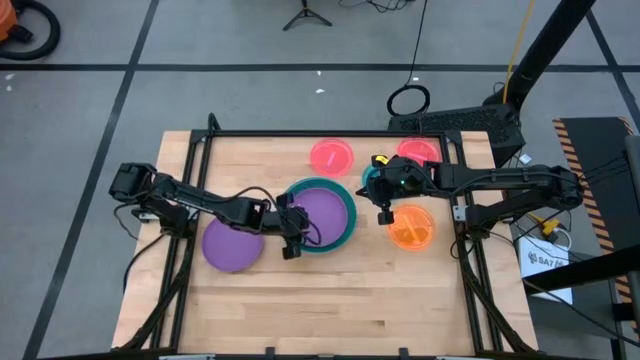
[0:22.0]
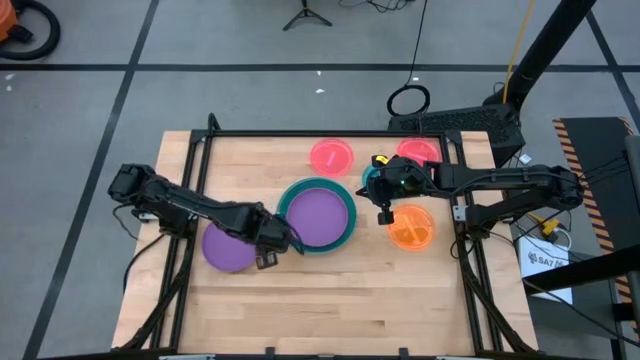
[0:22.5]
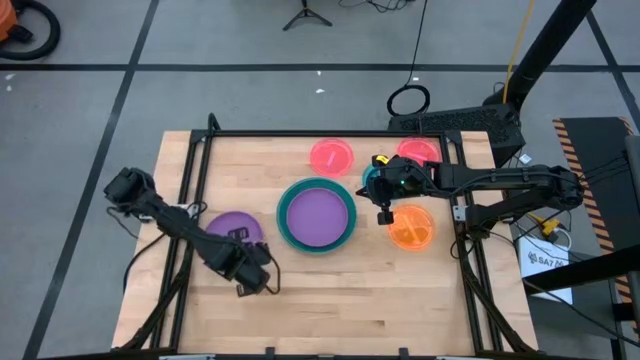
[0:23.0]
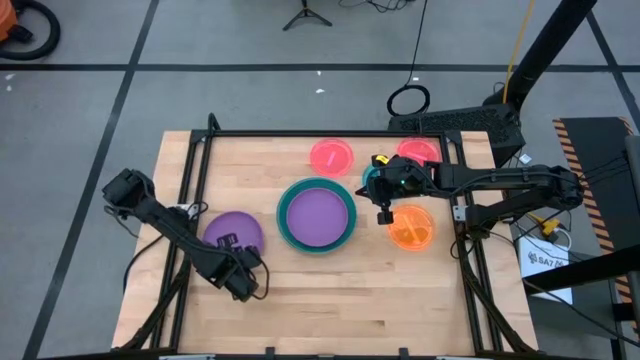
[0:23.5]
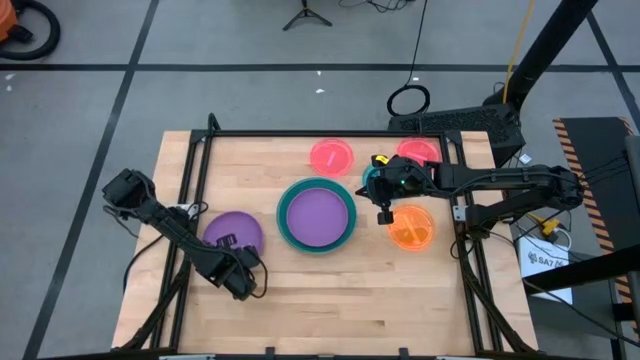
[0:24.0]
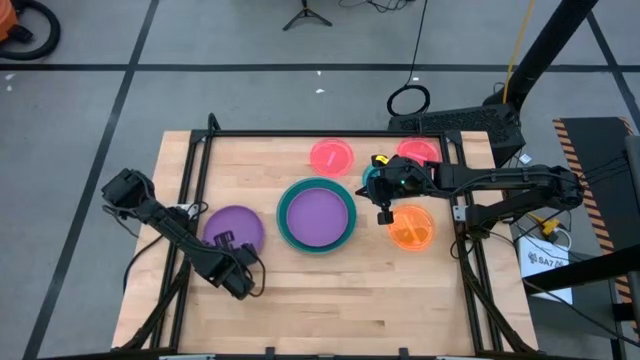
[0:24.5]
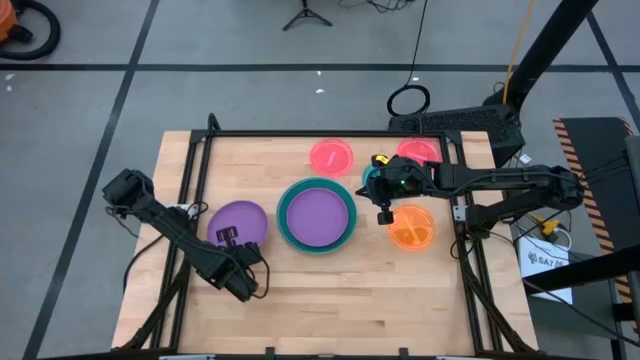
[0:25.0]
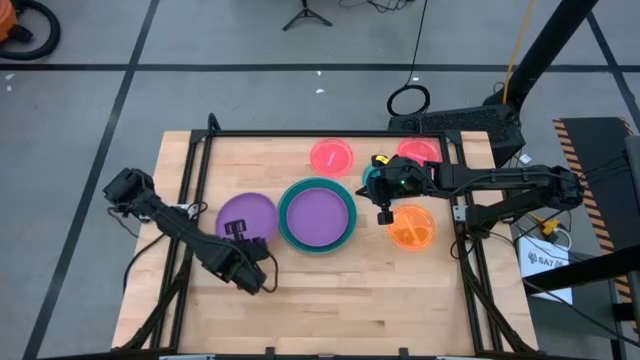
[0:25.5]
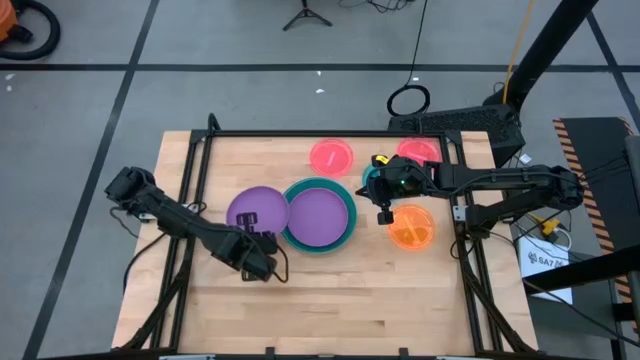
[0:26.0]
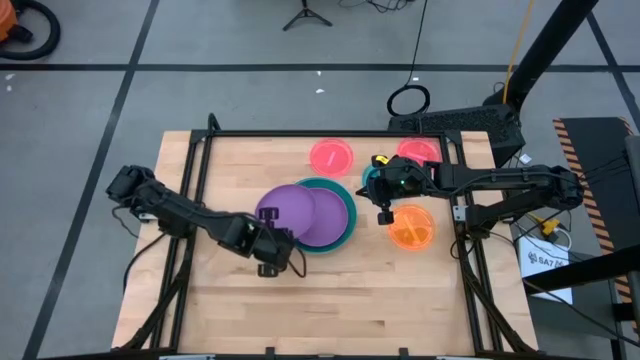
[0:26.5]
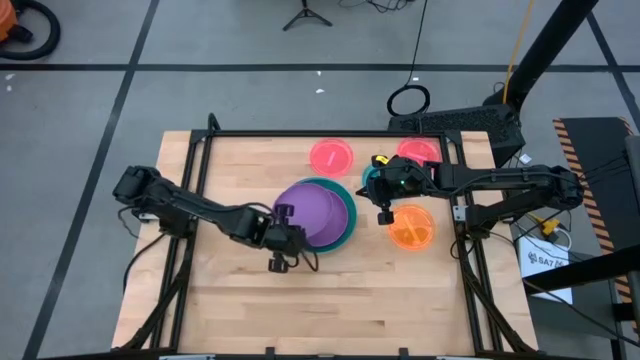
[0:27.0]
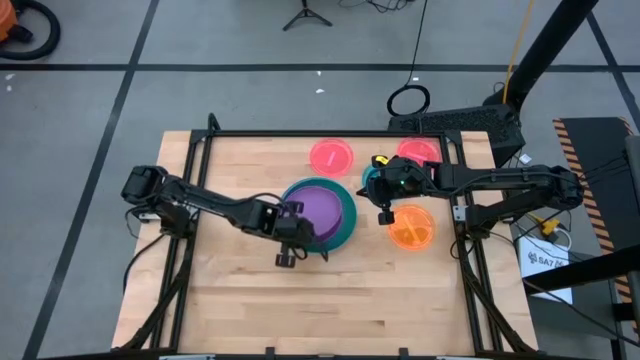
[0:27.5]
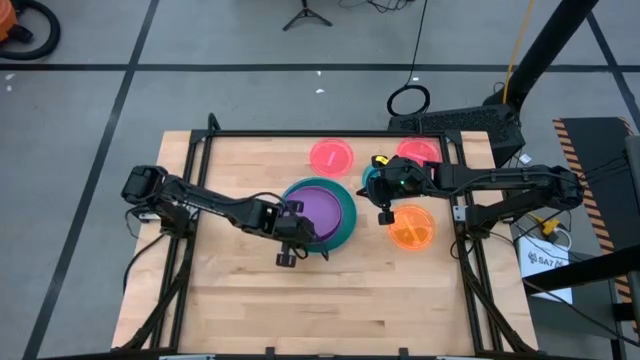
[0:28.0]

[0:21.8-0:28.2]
Task: Stack plastic plates
Stack the violet plate on the violet plate

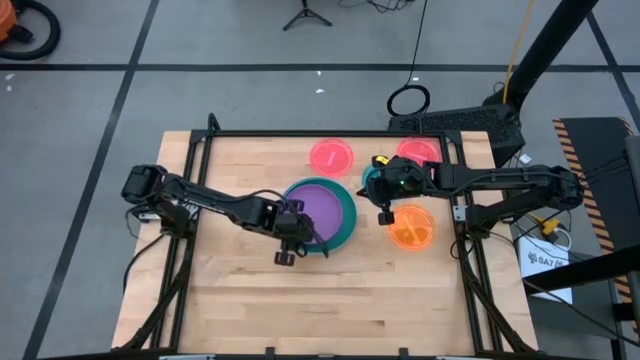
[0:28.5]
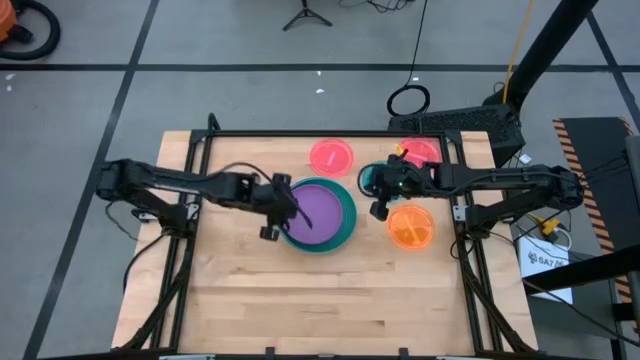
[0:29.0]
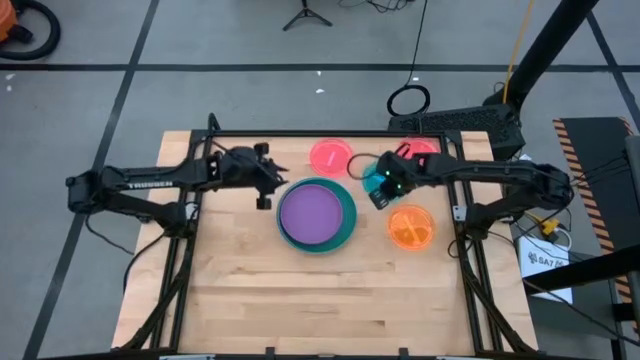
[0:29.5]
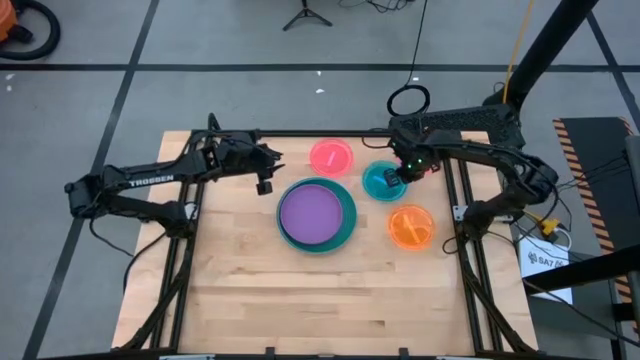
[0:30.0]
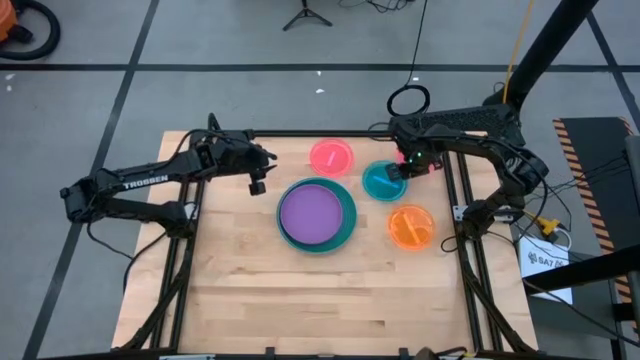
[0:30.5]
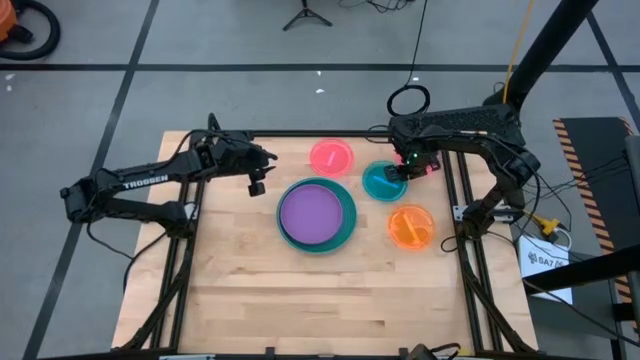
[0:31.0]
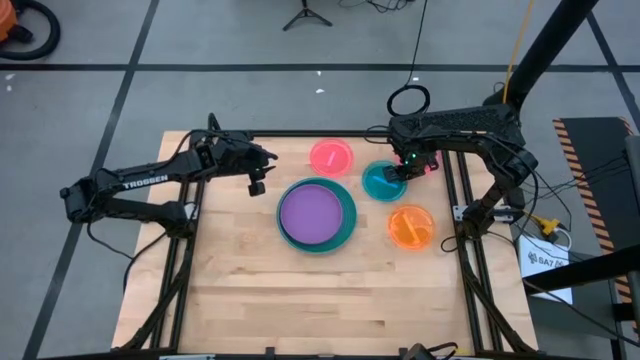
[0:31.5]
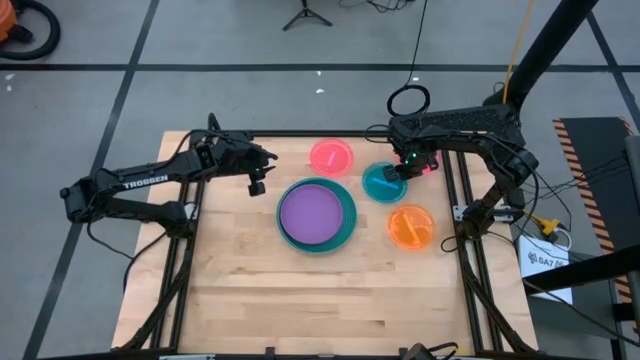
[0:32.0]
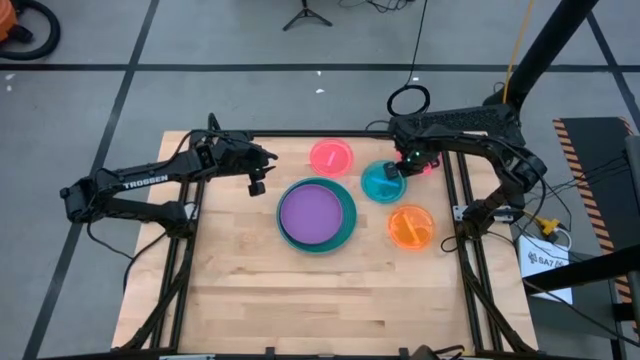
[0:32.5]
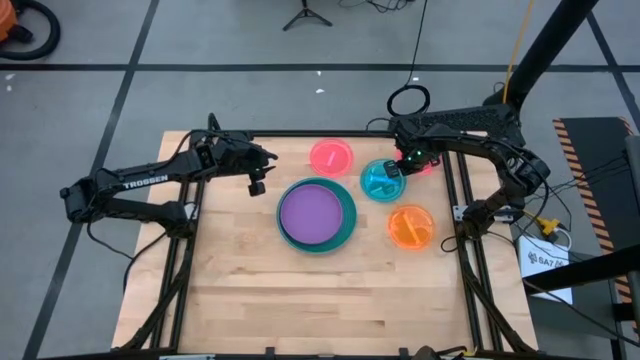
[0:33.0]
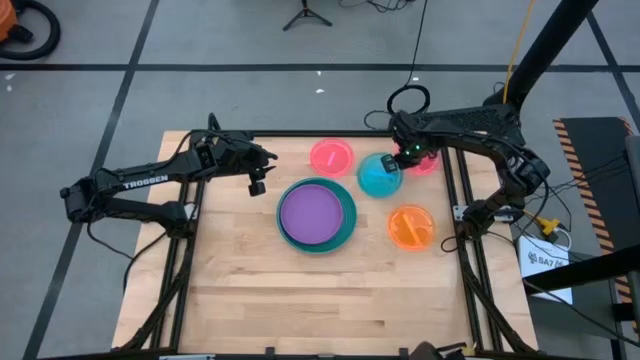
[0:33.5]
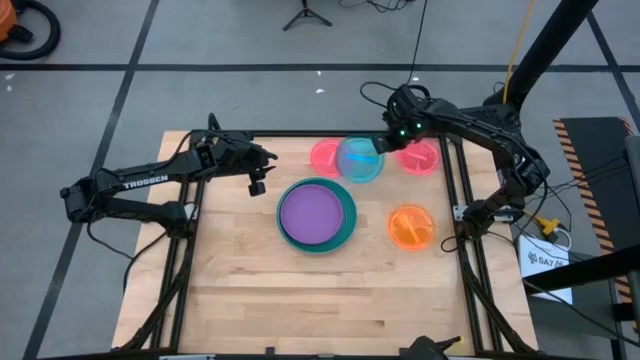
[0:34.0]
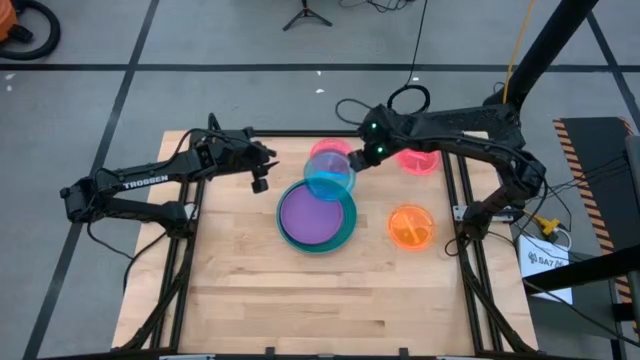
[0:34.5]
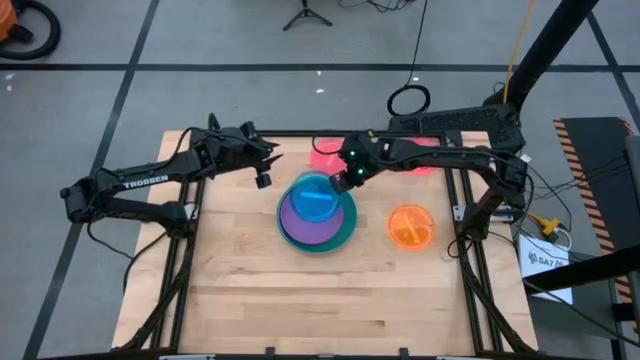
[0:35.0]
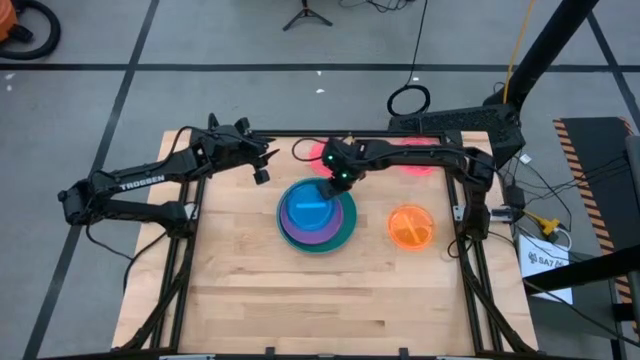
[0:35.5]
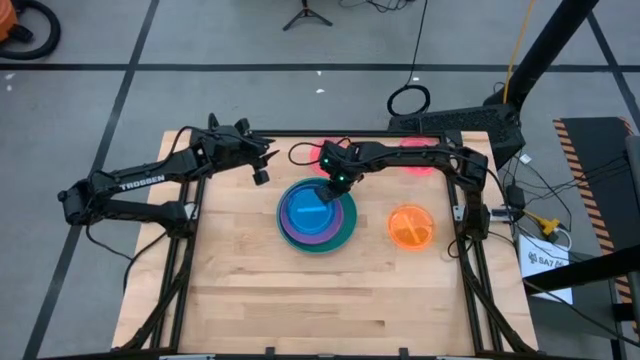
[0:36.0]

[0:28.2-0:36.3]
Stack the blue plate on the violet plate

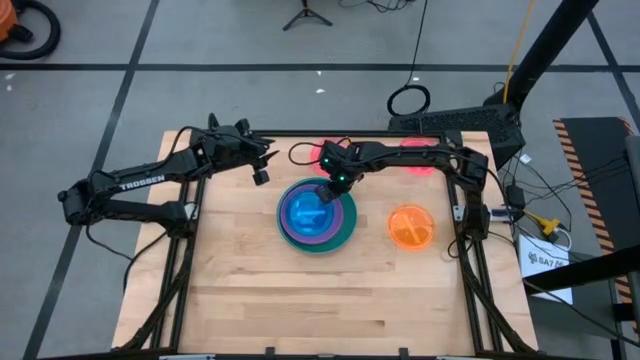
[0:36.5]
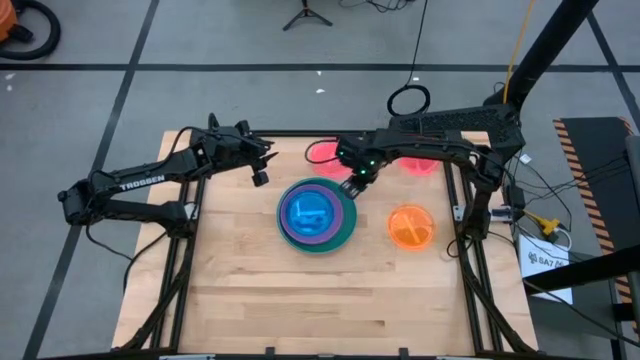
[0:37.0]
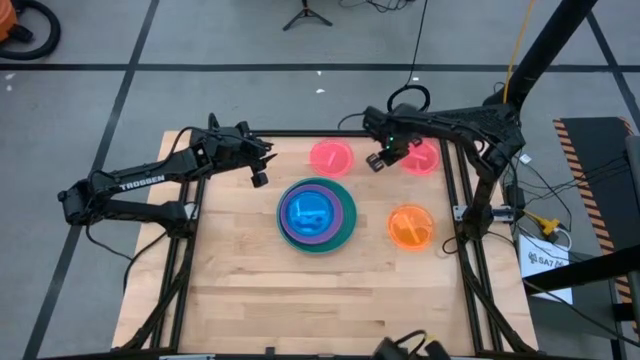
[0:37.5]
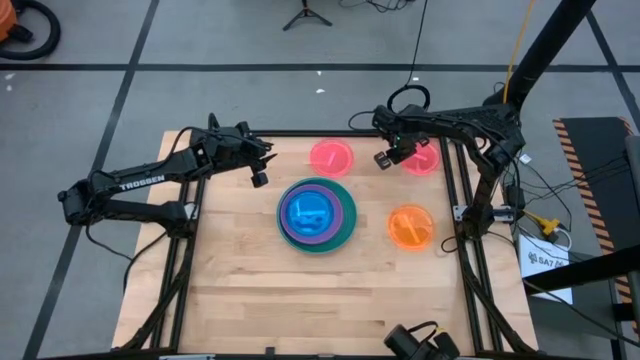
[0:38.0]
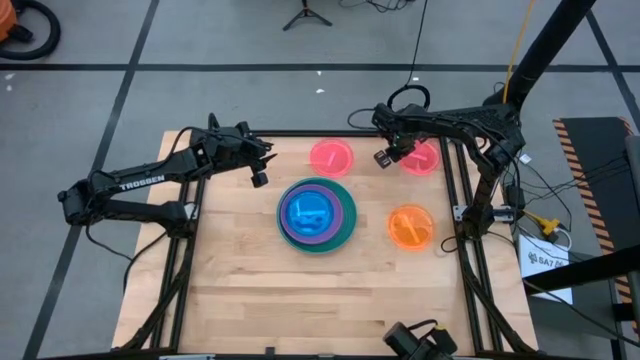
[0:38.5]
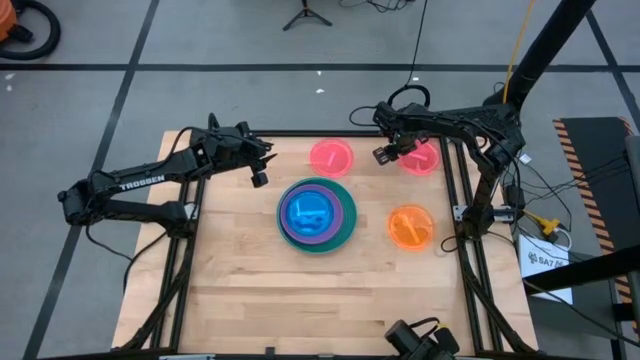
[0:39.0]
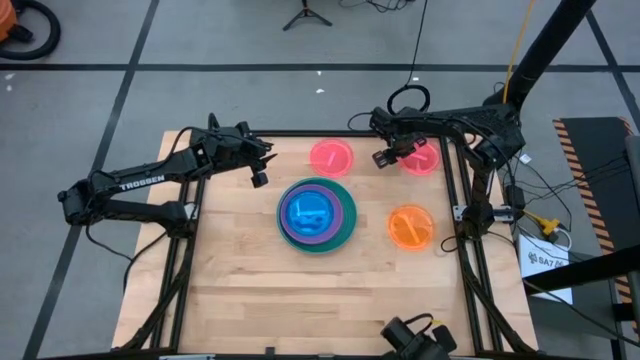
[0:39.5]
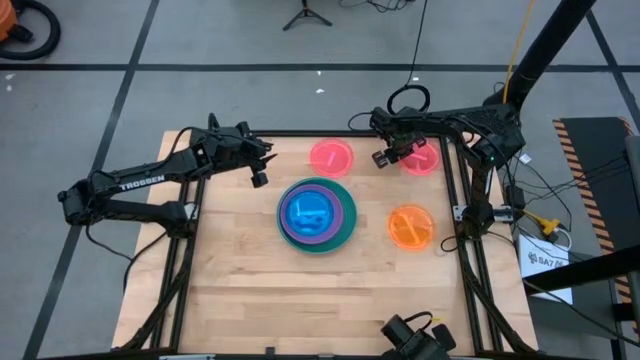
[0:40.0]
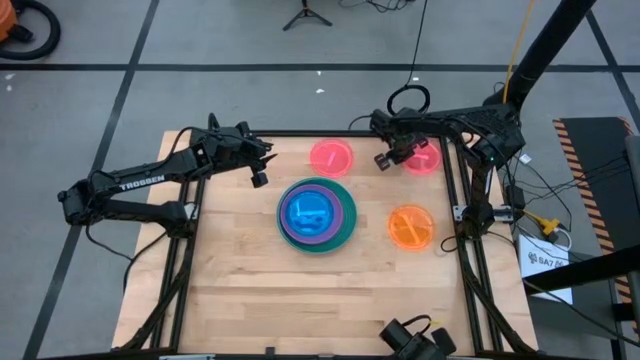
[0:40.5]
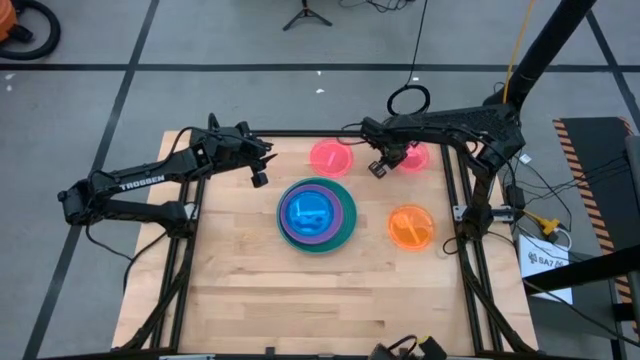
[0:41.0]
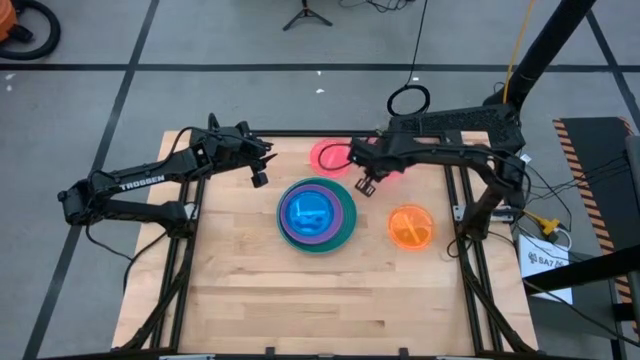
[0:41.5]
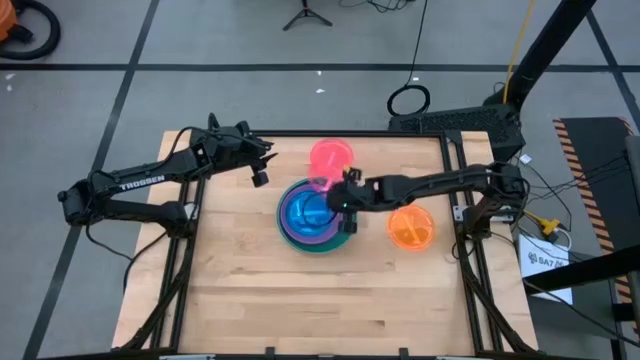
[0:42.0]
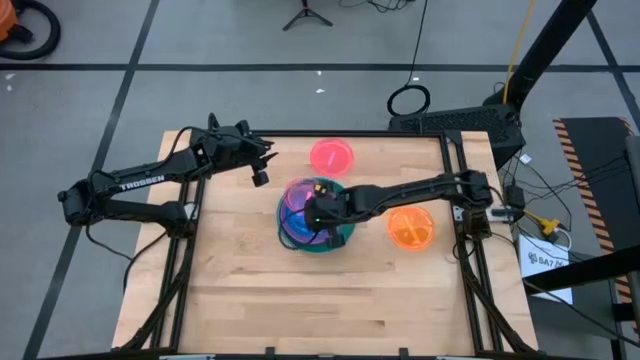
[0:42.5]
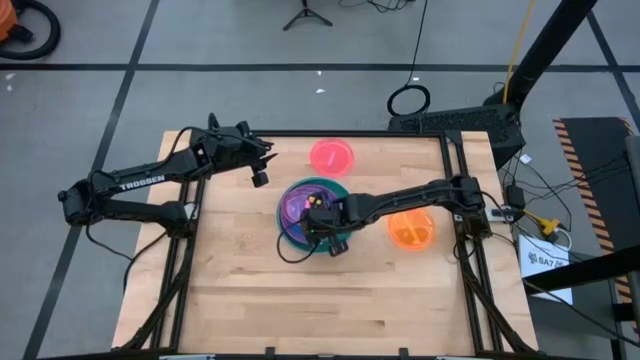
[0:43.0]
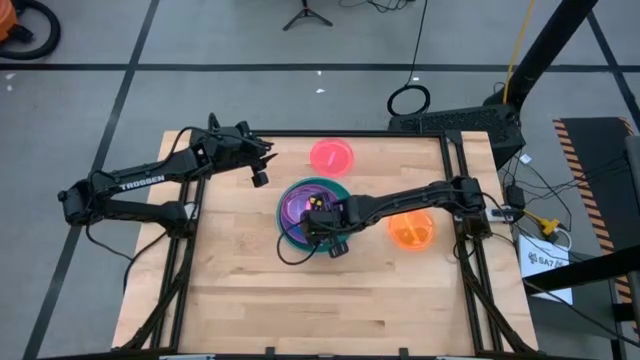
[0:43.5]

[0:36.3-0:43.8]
Stack the right pink plate on the blue plate
